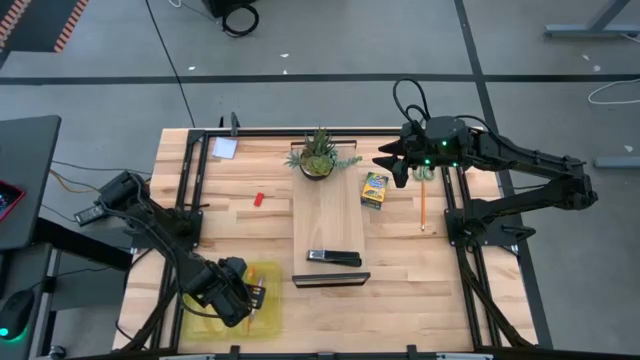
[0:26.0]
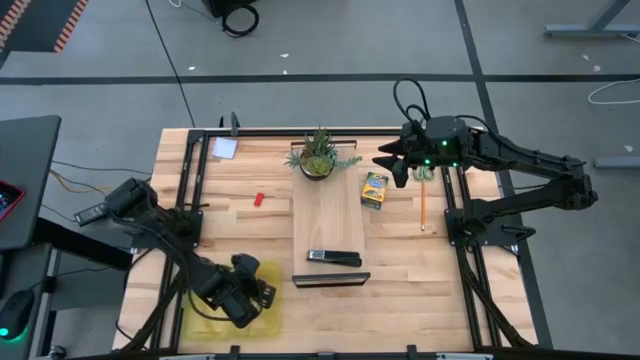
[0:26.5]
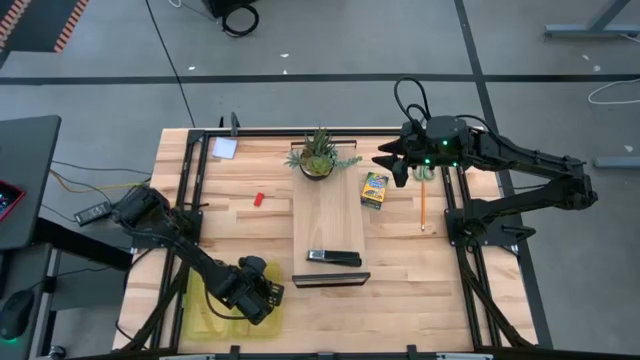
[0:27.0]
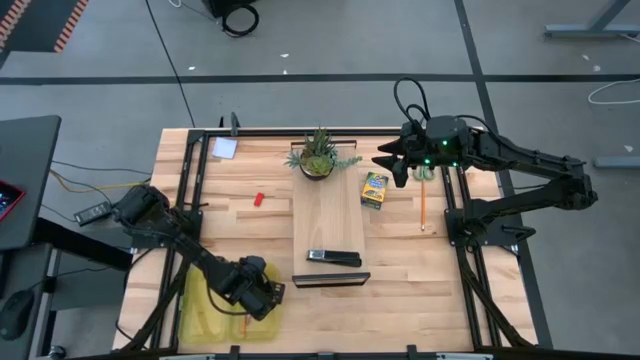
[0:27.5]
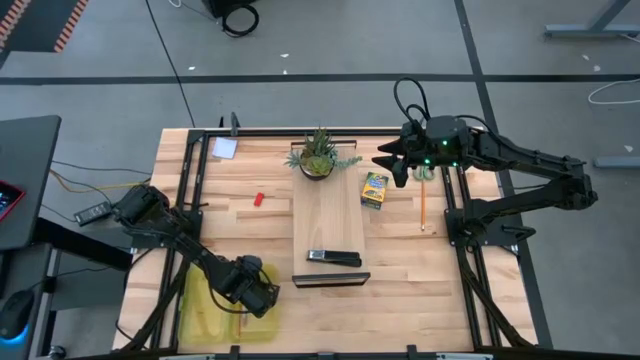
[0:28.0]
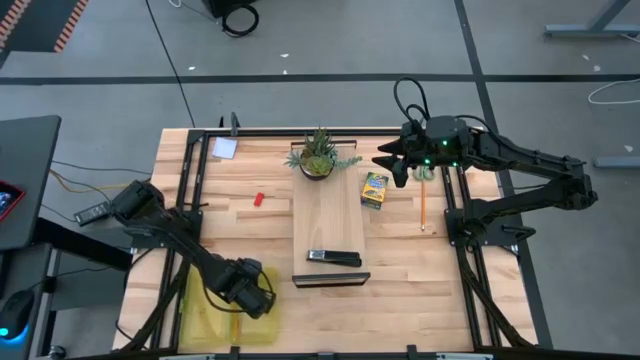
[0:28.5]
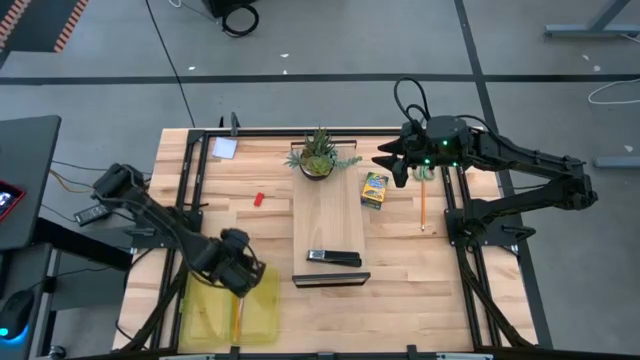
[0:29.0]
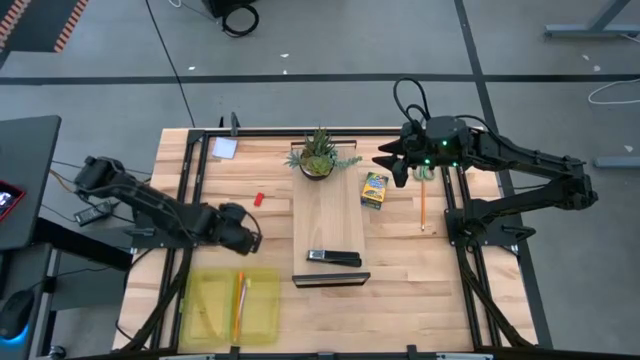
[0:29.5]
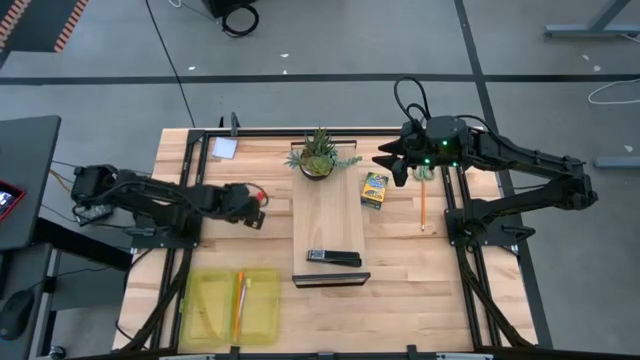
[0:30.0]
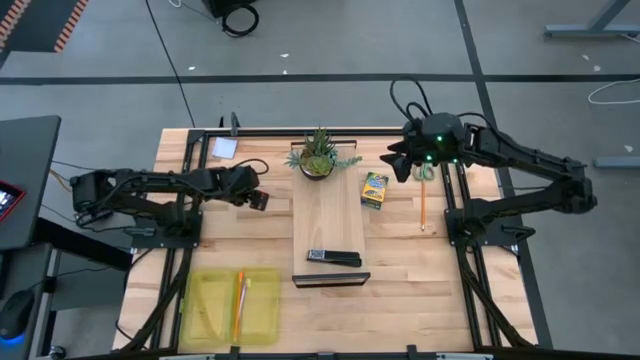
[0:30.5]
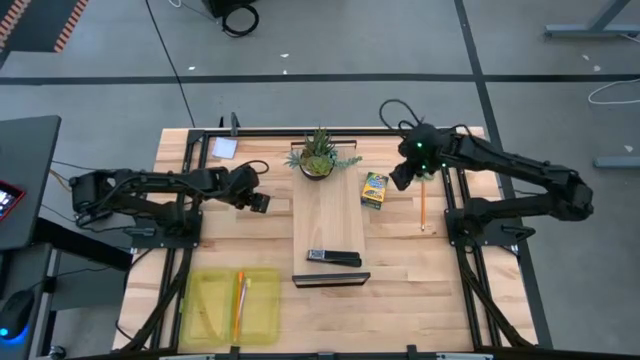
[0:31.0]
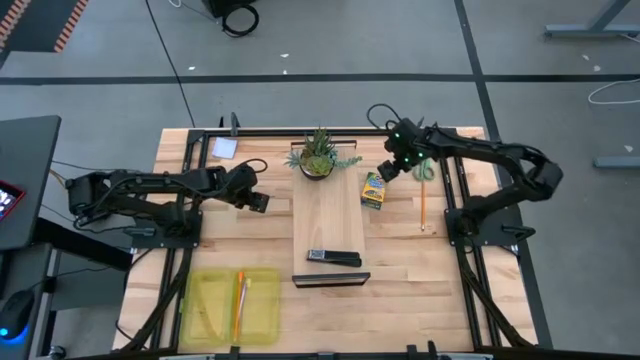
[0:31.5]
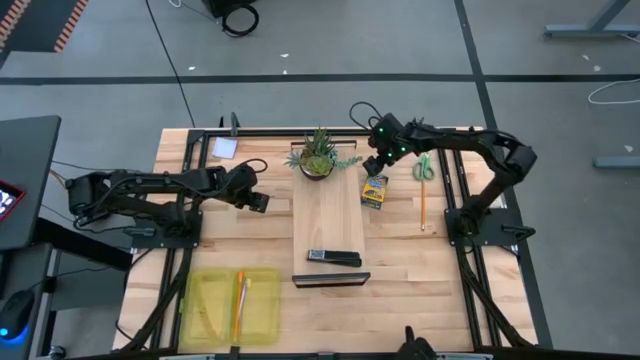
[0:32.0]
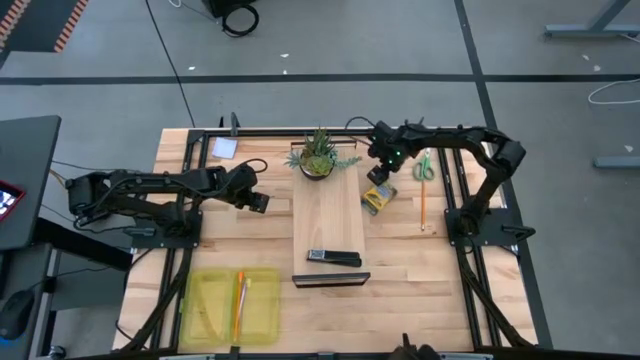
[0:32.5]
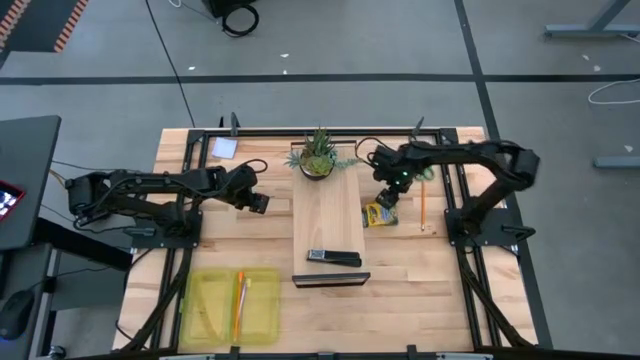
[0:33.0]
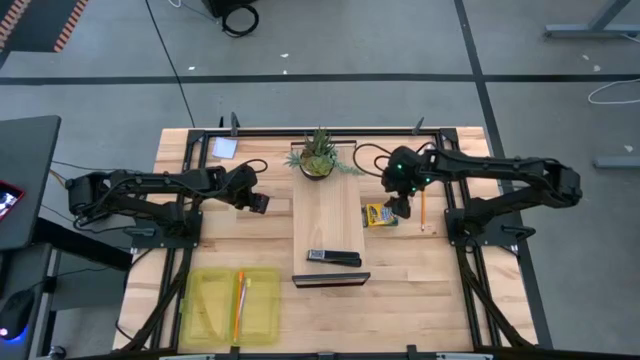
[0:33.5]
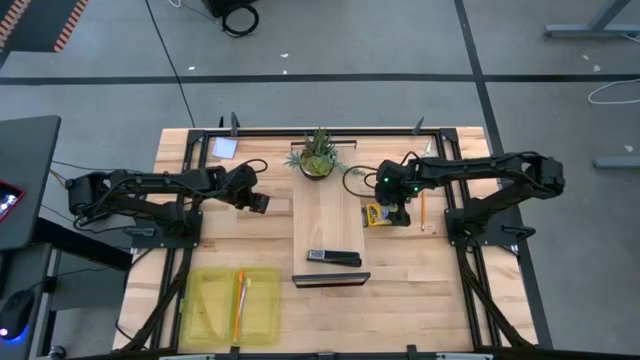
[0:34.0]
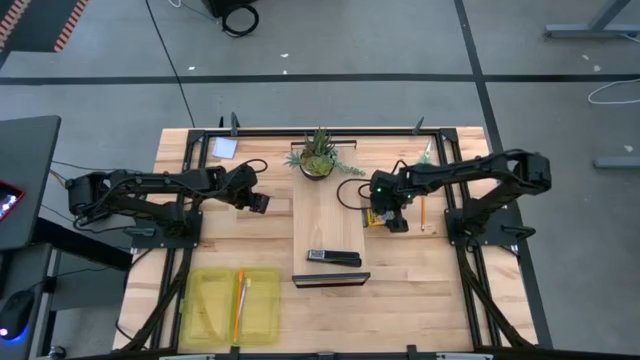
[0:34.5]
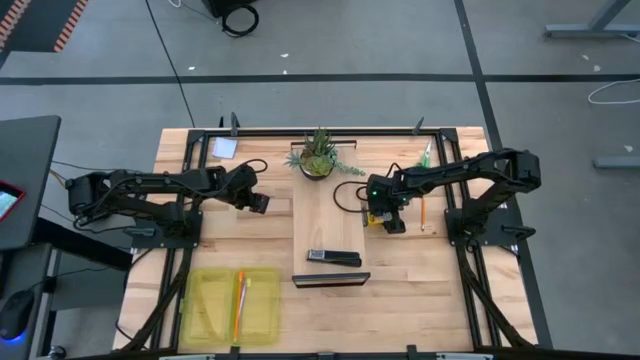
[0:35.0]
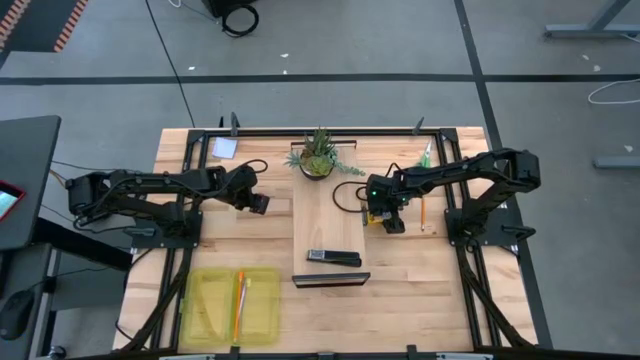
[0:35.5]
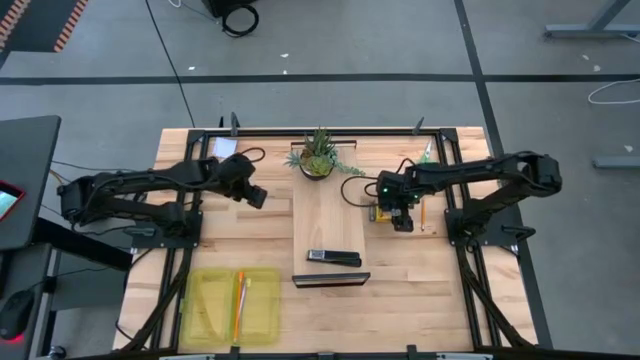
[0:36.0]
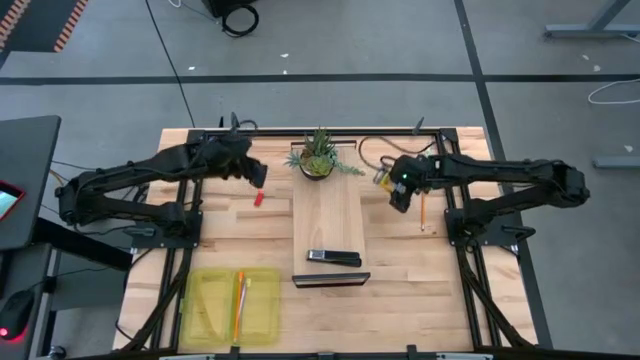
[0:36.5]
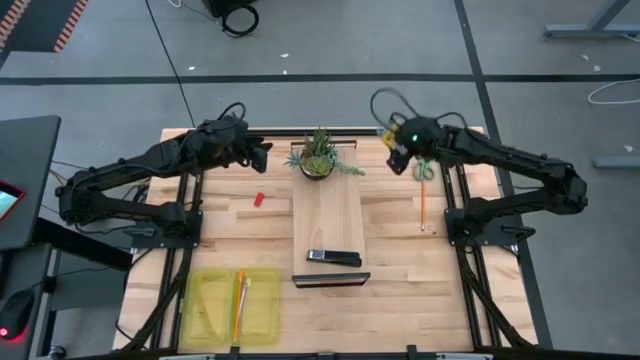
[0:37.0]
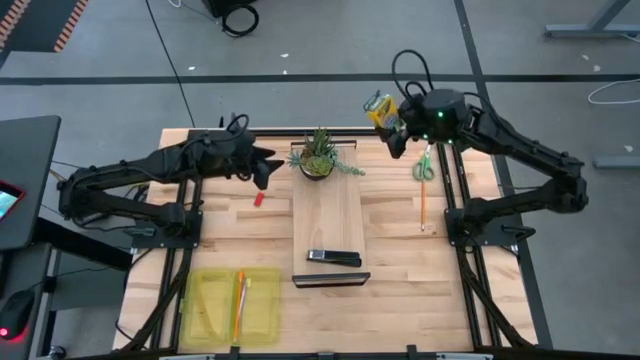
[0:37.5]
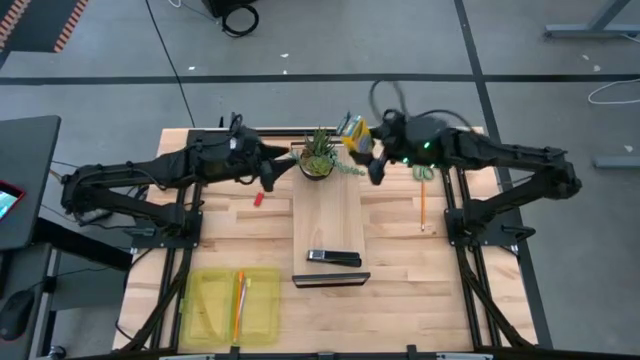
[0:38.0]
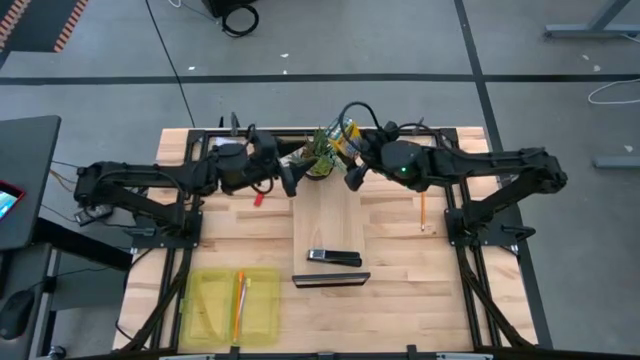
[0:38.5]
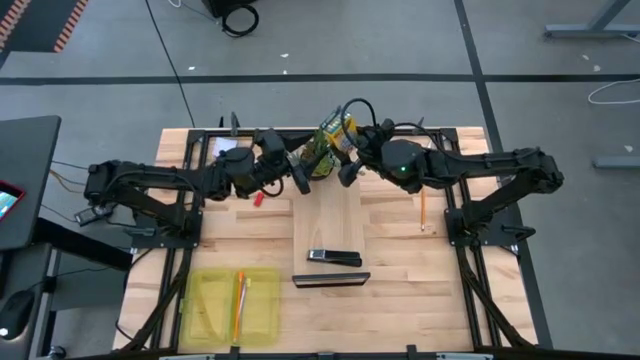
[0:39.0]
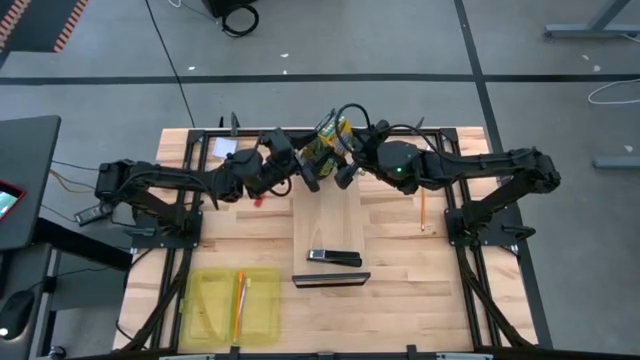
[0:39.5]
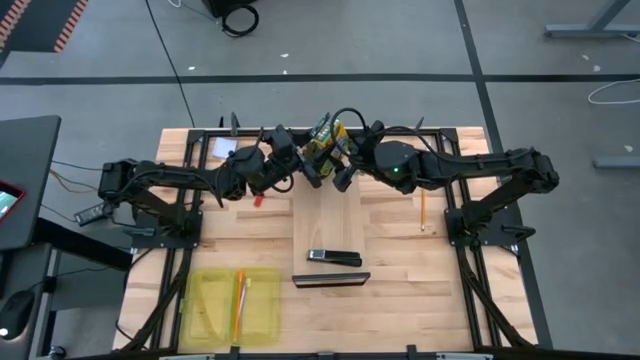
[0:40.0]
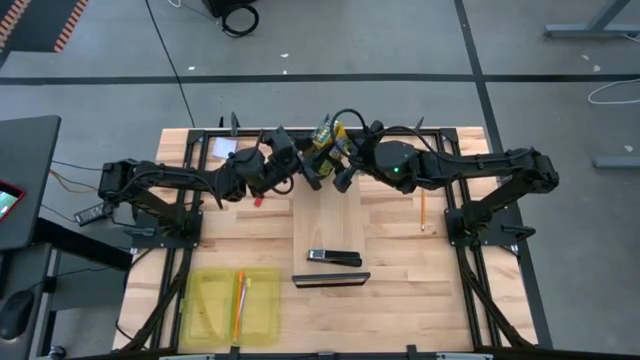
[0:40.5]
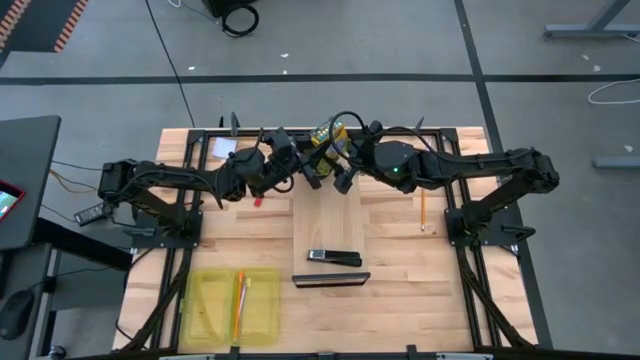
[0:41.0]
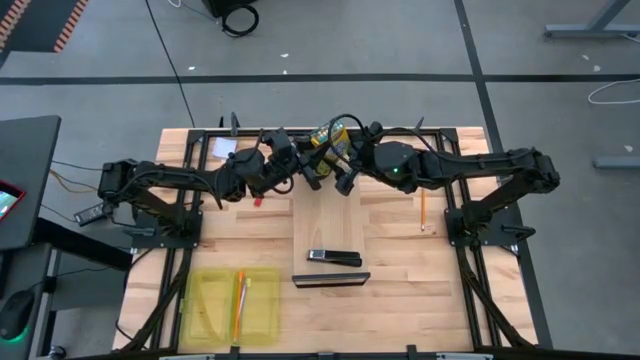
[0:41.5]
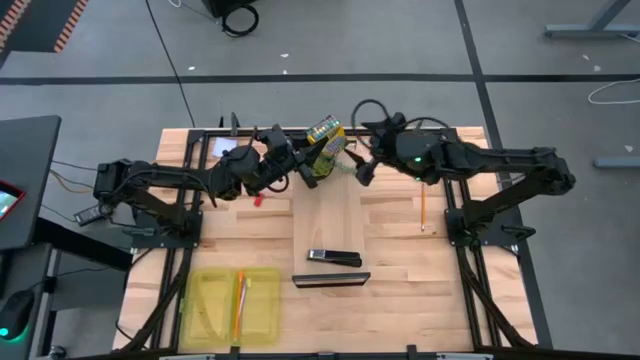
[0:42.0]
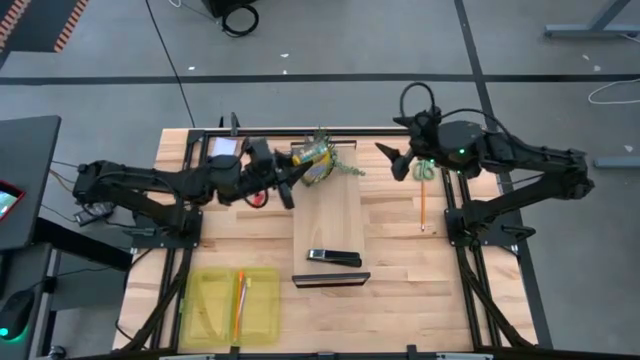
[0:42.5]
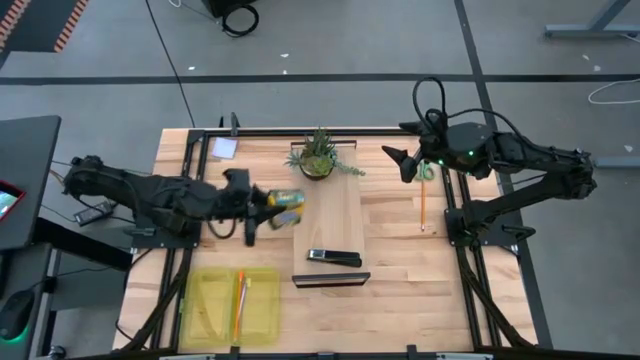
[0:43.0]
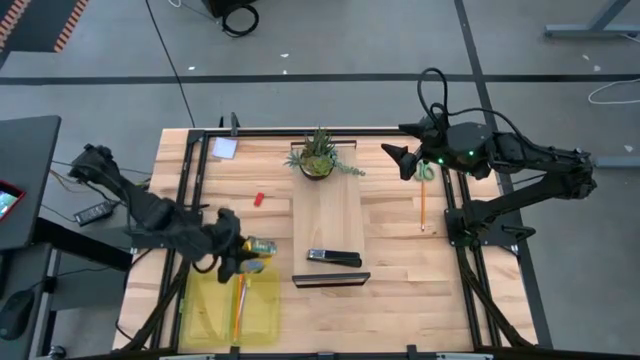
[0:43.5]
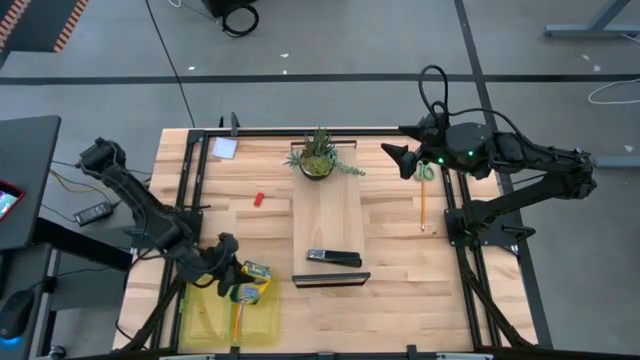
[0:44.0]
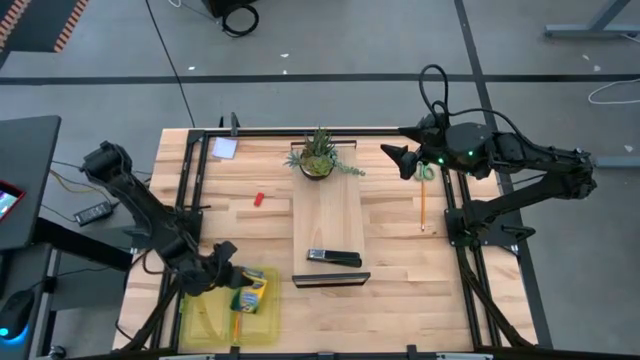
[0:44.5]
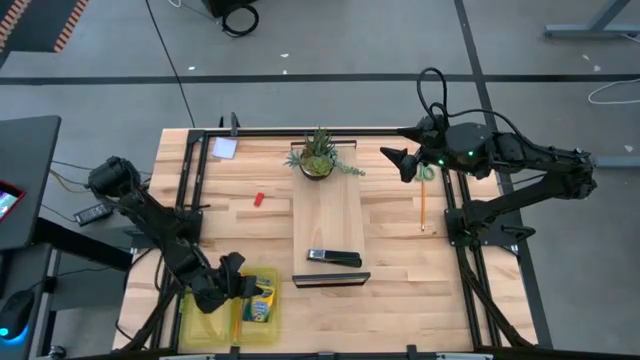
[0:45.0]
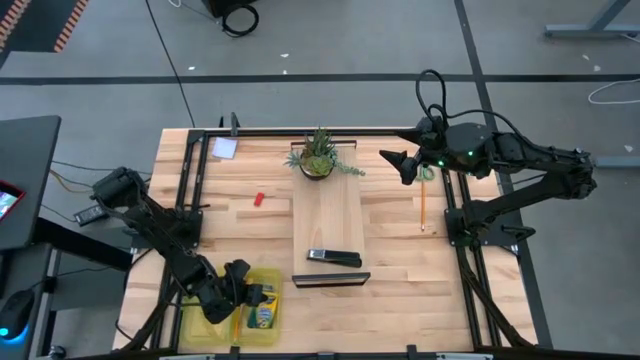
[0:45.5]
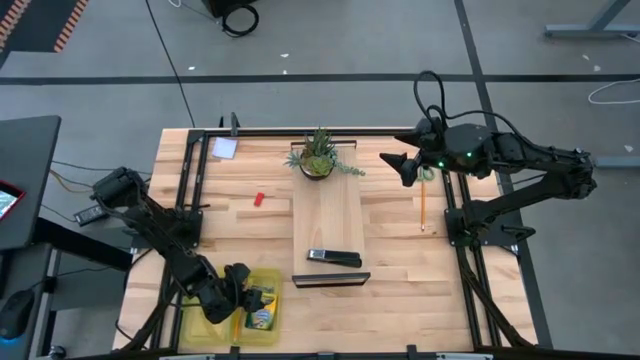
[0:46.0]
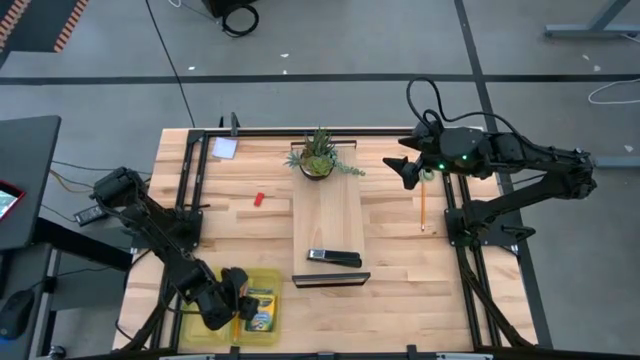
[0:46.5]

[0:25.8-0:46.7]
Task: Pack school essentials
Put the yellow crayon box into the yellow supply box
